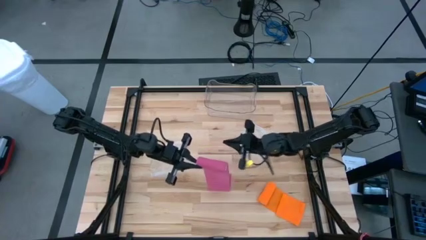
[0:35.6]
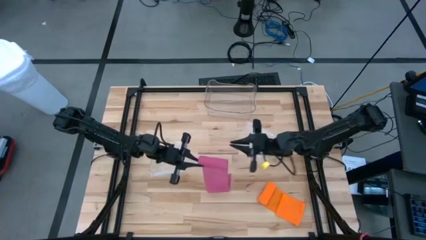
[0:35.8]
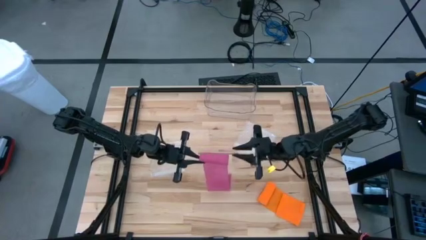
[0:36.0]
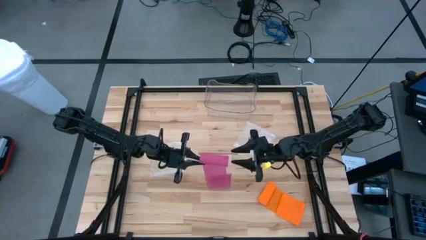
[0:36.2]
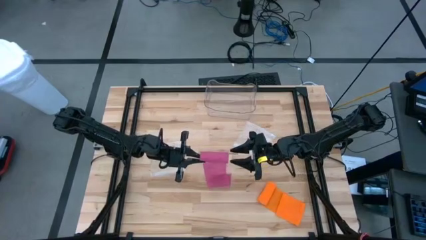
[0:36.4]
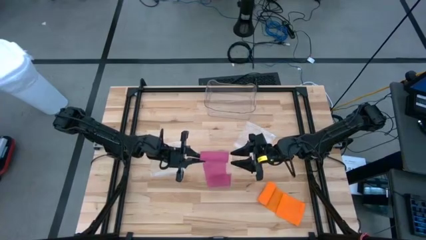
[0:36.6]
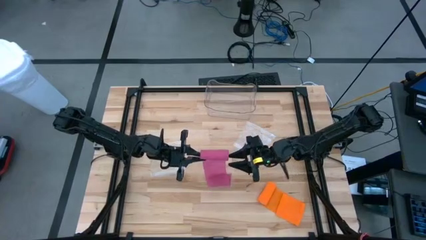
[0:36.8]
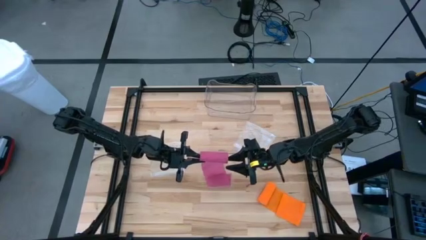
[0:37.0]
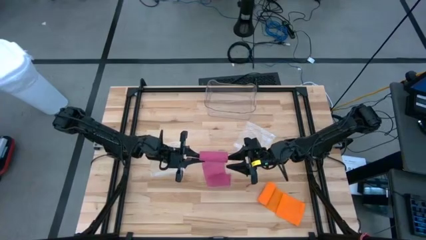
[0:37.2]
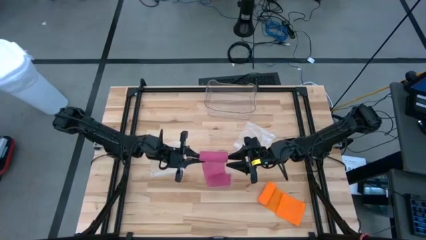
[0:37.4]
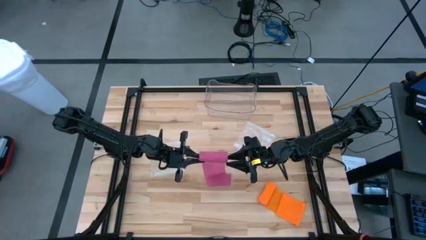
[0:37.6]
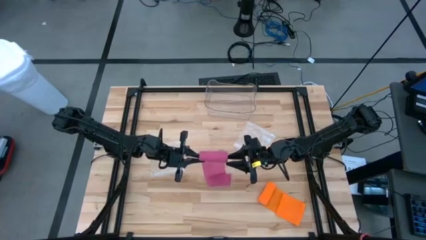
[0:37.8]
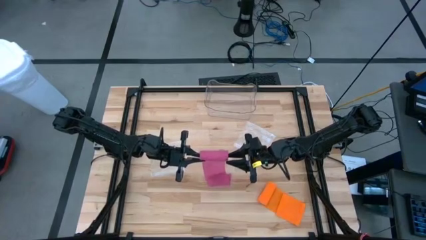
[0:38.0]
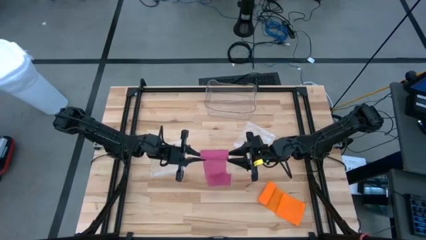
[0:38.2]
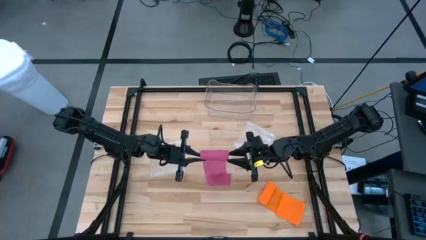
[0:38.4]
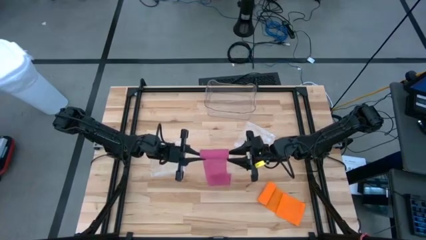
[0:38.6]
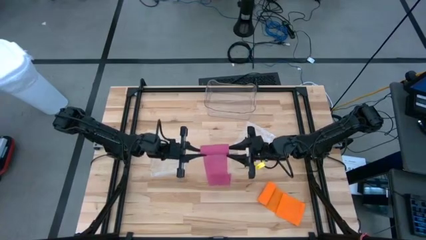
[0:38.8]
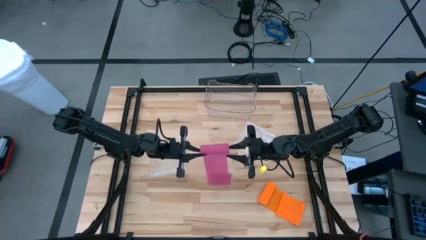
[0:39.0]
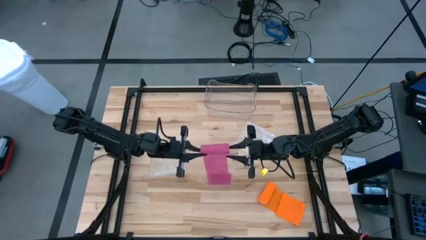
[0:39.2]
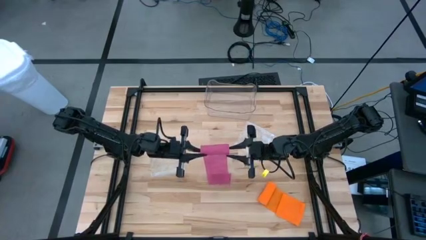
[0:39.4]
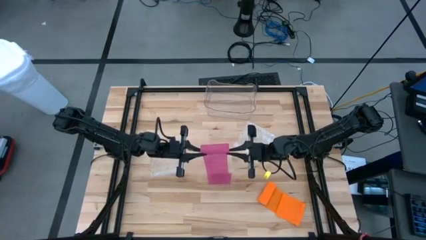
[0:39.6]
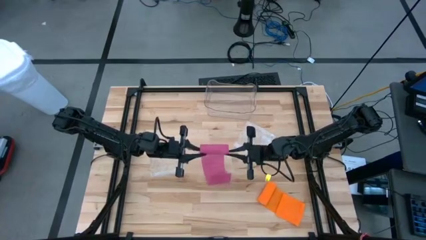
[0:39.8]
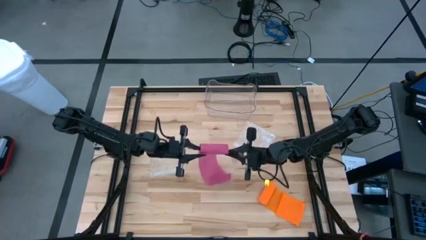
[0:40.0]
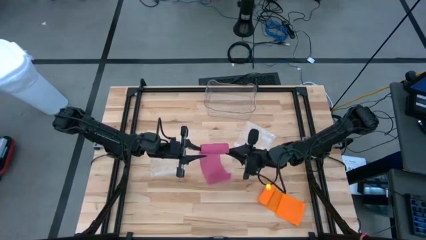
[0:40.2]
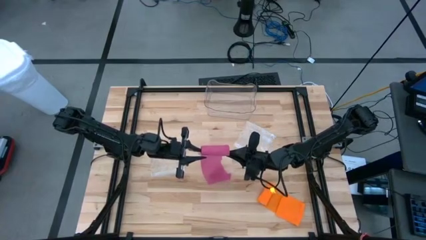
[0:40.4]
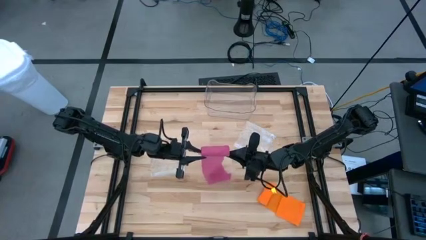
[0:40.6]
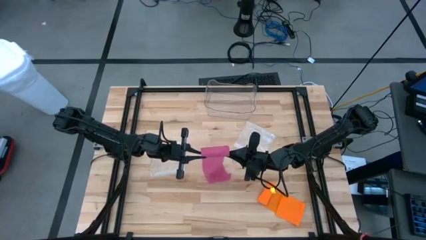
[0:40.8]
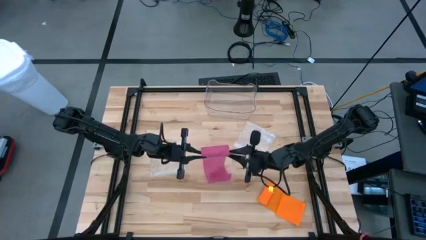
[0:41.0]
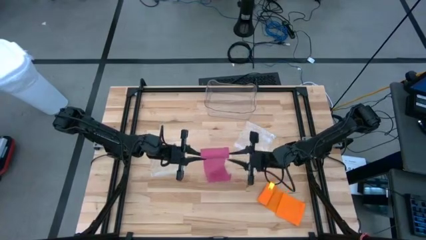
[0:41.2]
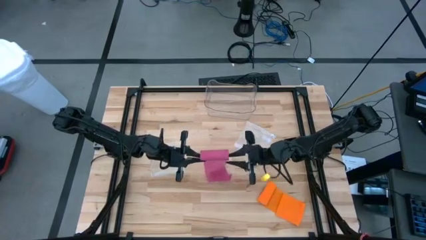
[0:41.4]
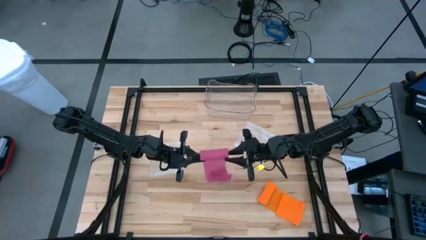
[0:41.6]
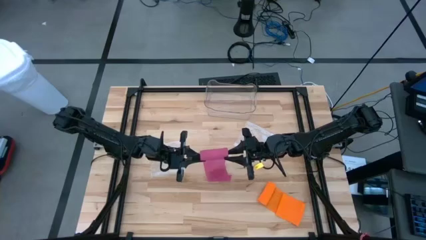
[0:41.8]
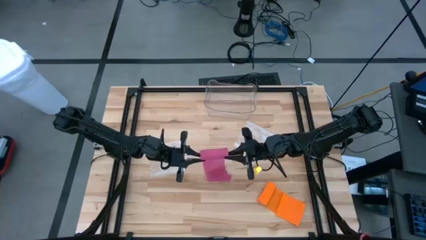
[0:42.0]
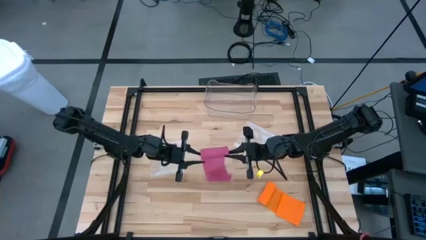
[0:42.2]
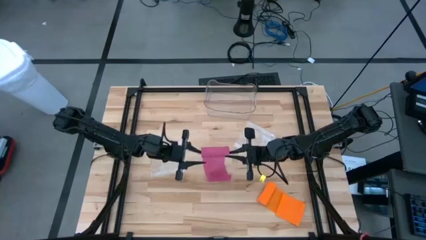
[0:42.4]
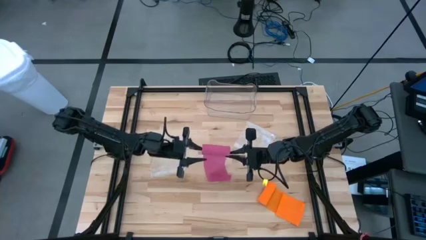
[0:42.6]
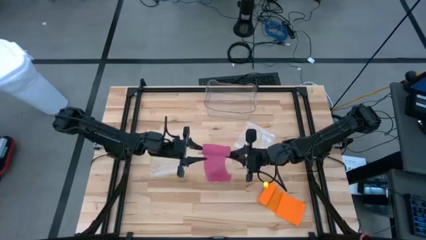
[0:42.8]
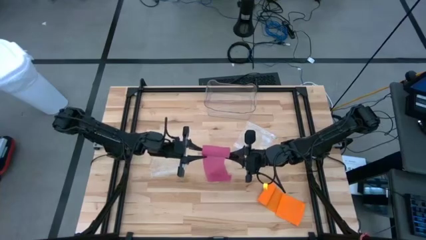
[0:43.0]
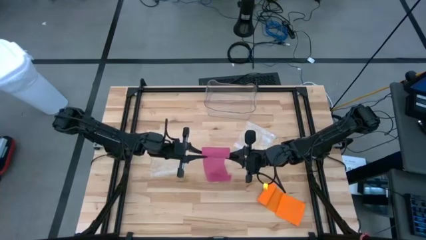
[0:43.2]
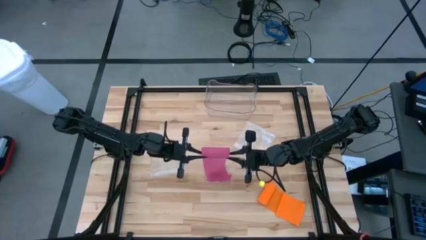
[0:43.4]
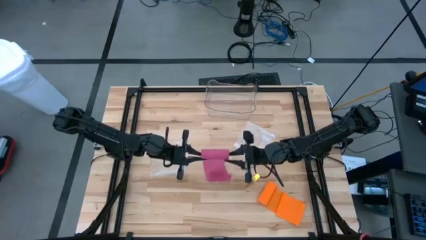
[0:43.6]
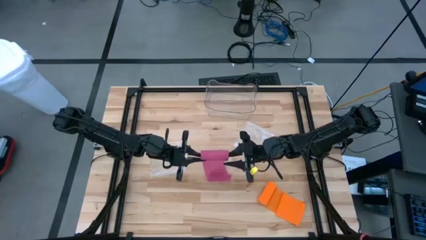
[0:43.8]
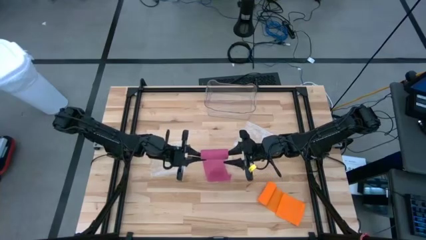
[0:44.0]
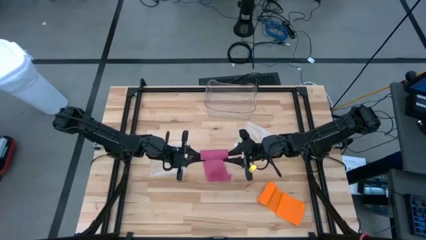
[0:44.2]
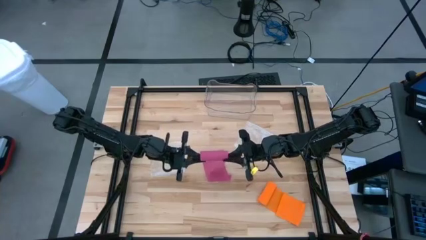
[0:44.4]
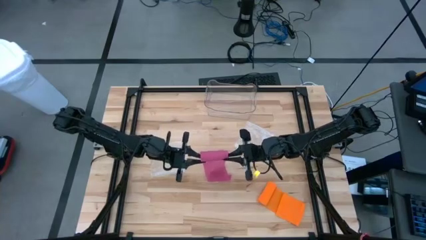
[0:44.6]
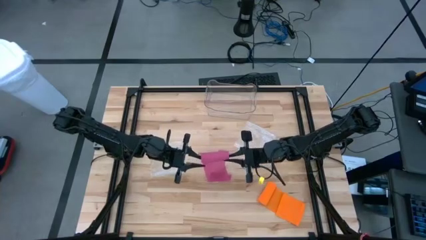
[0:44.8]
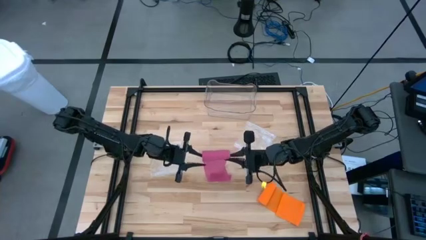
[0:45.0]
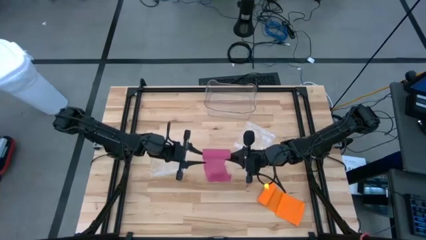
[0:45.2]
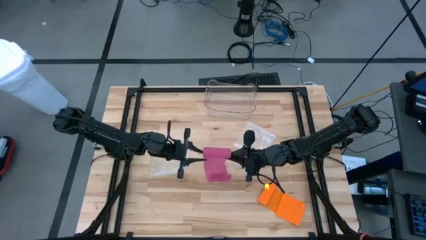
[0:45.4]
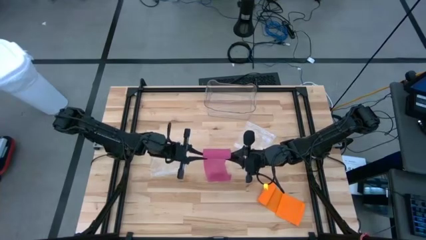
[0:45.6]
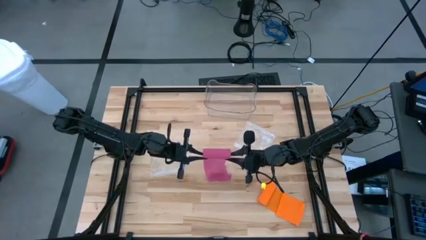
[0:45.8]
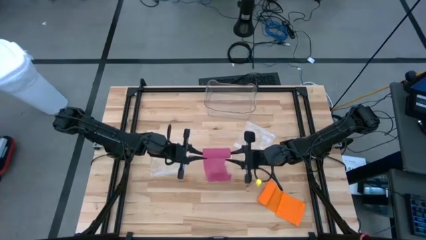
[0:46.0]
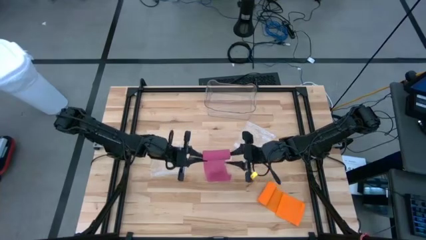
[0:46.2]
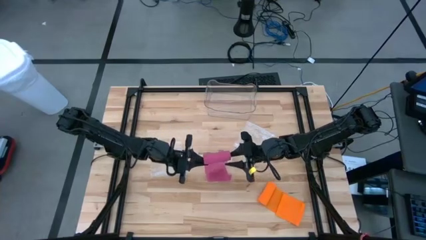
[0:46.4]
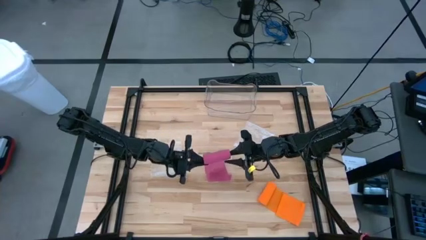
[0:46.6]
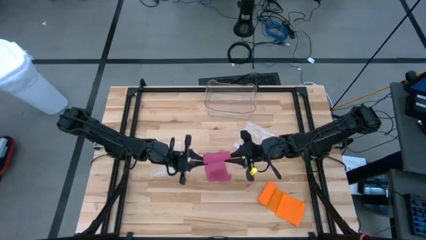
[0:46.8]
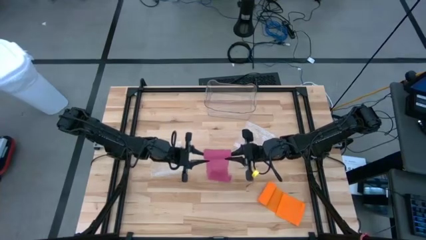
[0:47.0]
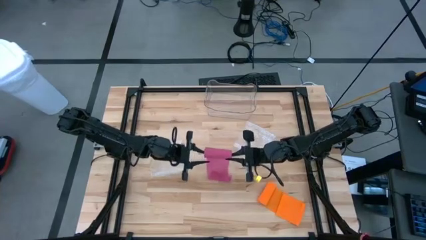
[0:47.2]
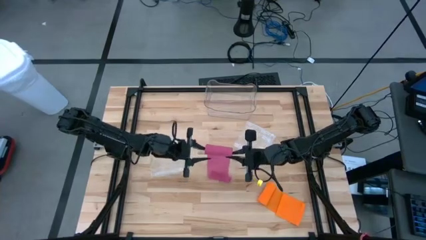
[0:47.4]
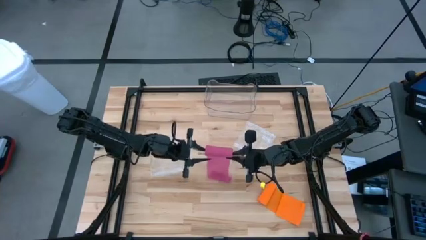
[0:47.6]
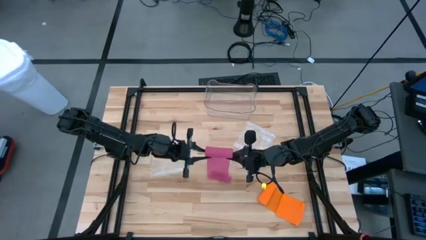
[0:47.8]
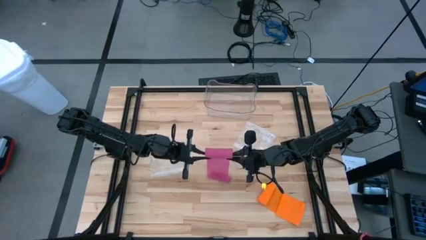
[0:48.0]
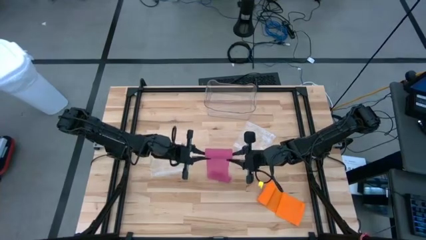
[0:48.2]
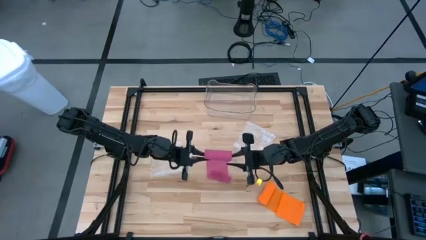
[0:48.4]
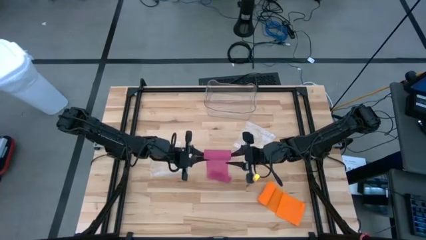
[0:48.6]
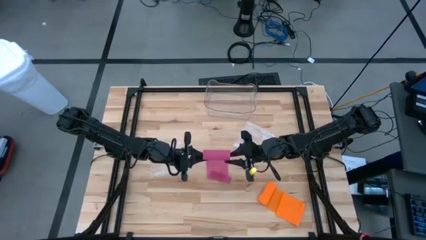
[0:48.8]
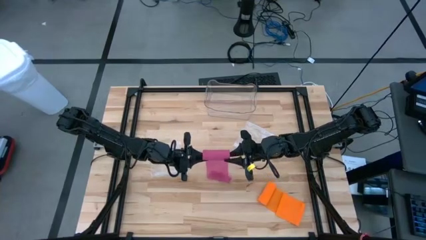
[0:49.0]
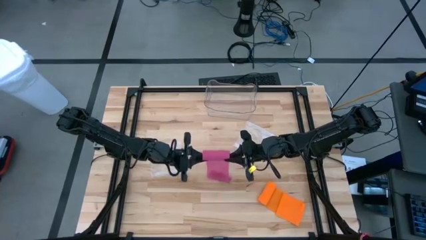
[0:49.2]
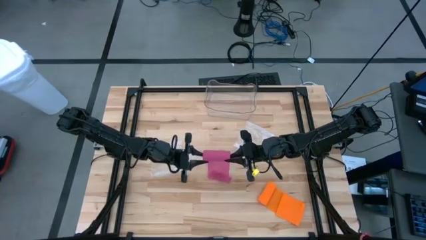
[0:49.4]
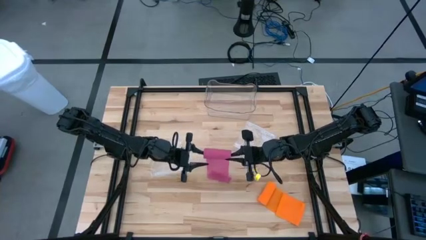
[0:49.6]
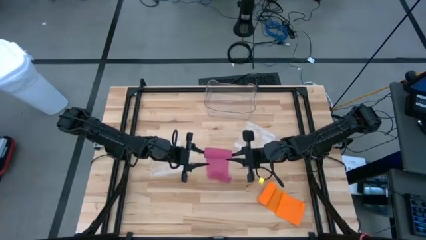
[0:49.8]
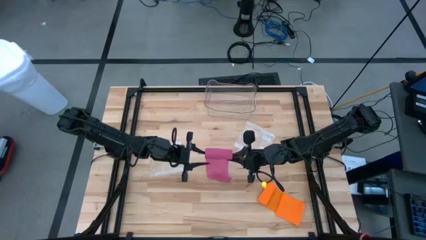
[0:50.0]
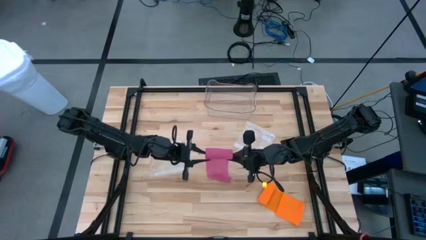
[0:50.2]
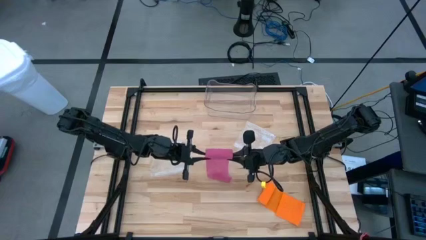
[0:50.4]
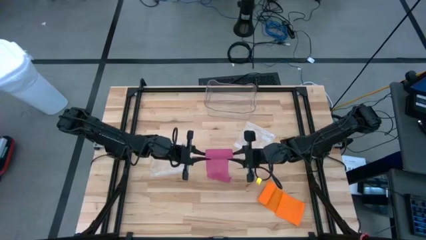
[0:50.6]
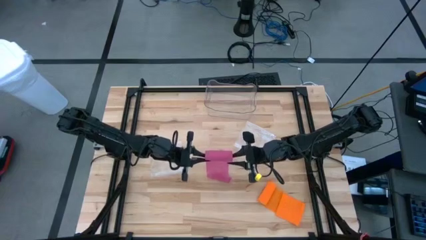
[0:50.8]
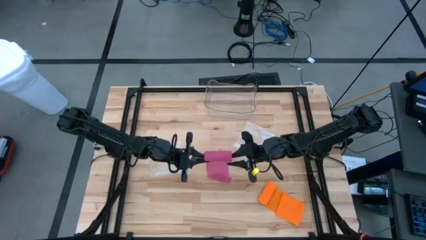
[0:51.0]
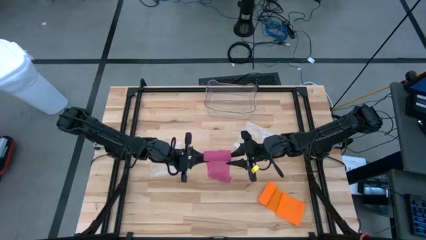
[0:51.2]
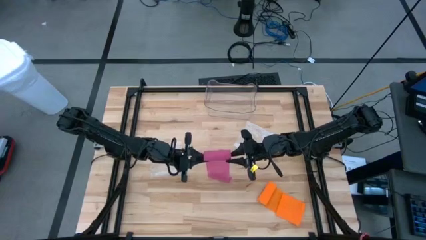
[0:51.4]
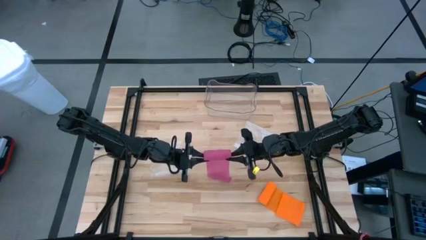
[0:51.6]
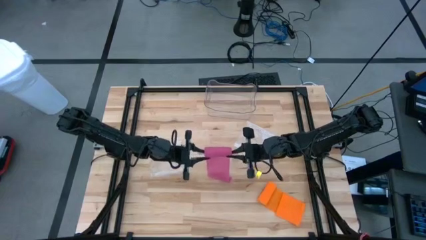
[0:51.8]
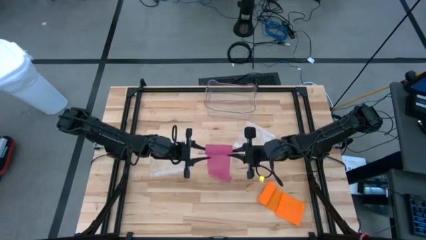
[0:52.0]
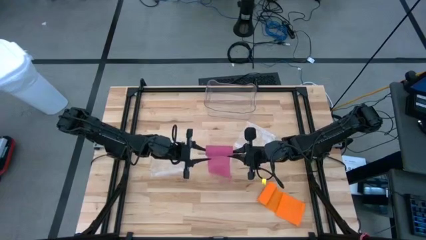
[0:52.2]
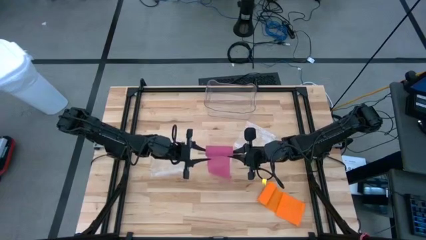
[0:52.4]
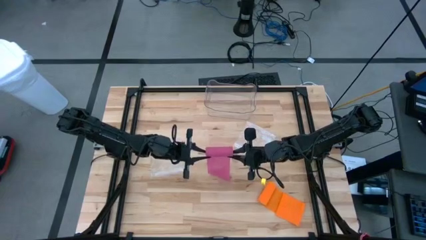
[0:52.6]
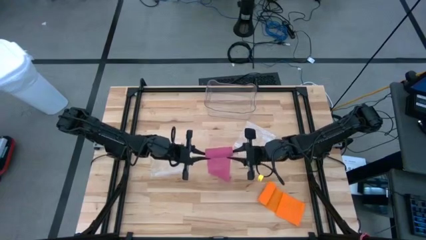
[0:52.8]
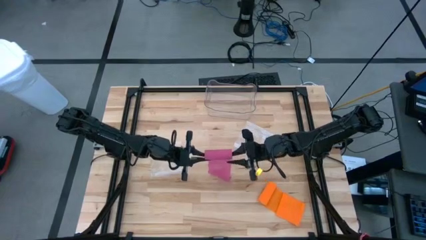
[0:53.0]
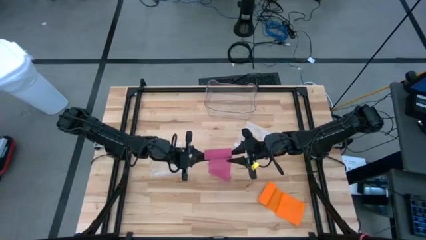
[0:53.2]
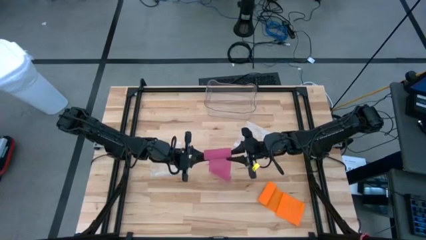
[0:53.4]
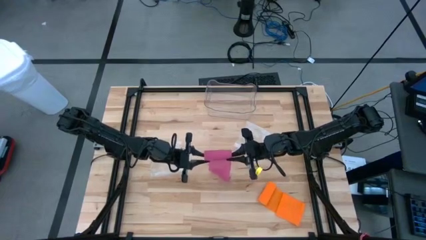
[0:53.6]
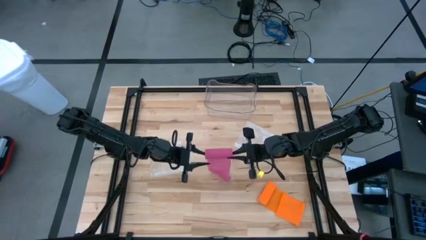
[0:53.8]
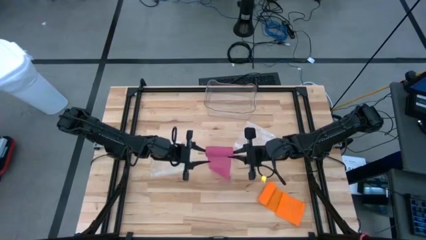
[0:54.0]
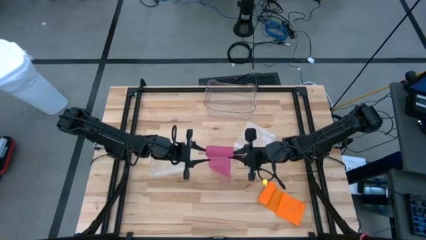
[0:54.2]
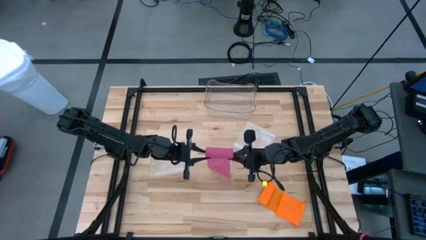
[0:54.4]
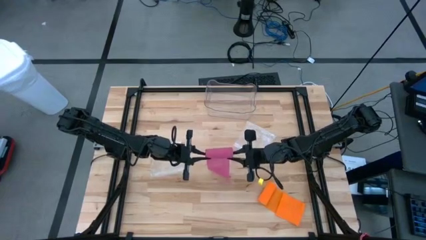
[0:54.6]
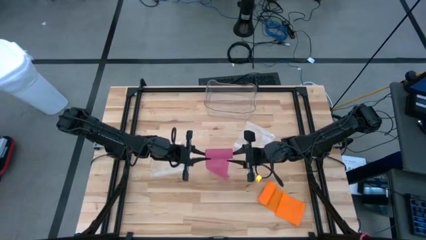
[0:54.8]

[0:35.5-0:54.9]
Task: Roll bandage
Roll the pink bandage
